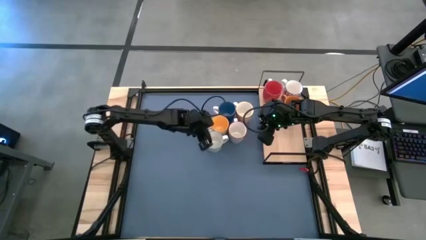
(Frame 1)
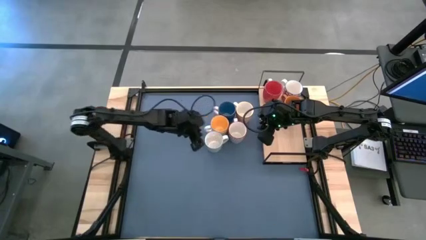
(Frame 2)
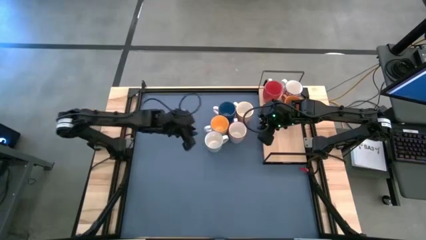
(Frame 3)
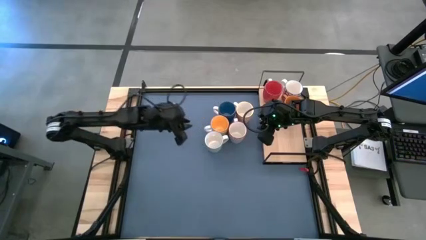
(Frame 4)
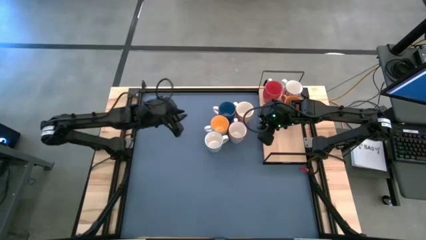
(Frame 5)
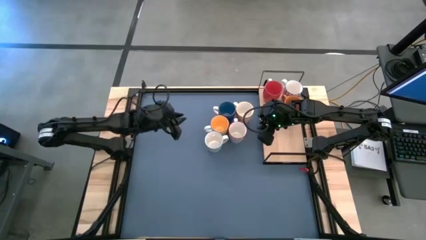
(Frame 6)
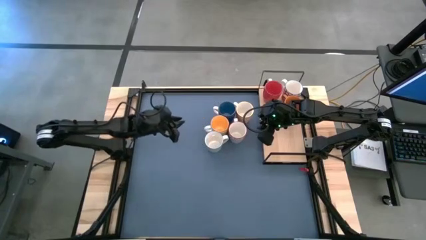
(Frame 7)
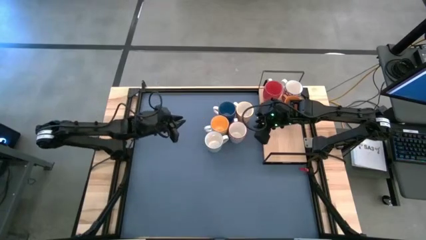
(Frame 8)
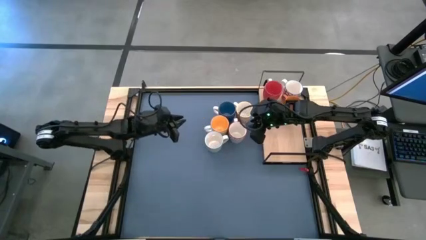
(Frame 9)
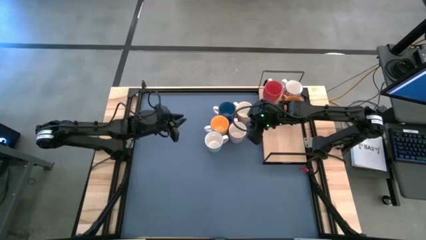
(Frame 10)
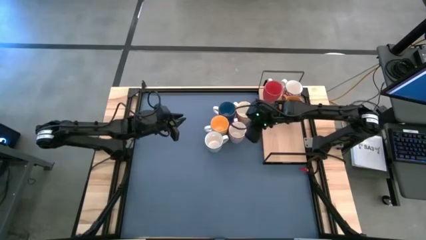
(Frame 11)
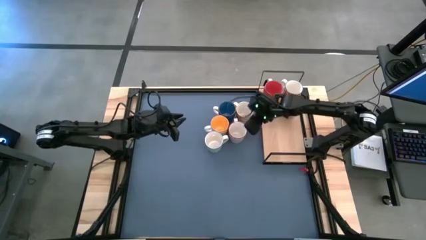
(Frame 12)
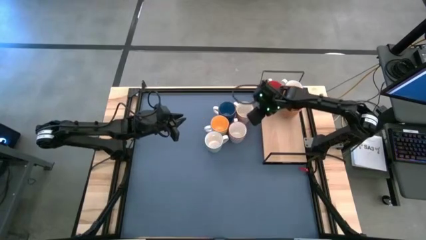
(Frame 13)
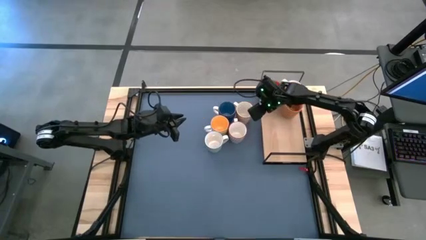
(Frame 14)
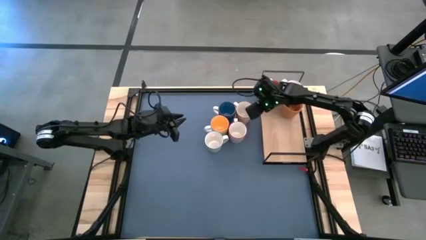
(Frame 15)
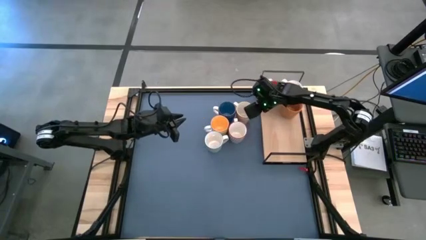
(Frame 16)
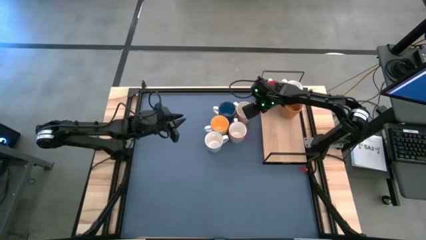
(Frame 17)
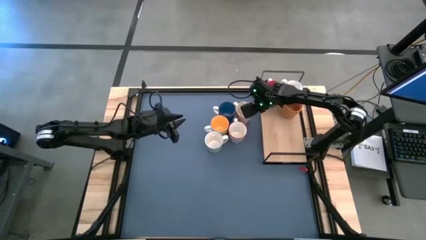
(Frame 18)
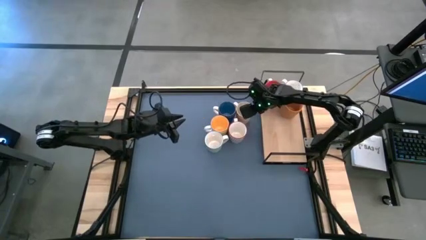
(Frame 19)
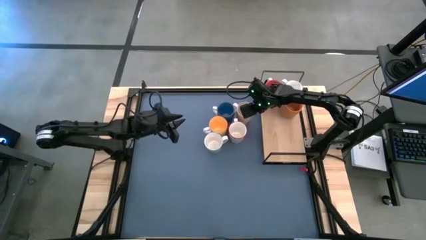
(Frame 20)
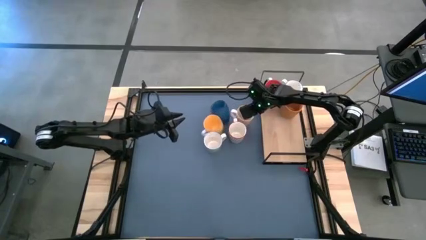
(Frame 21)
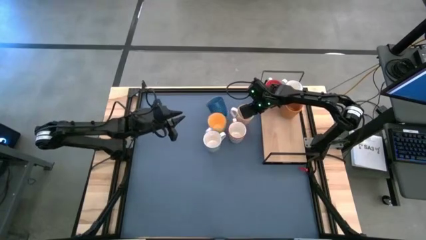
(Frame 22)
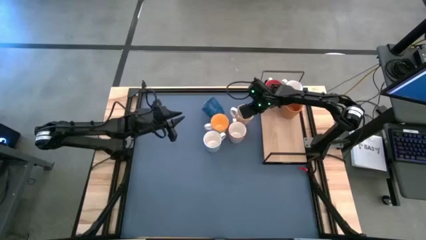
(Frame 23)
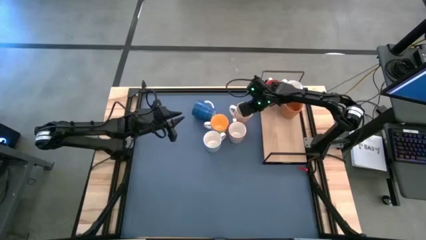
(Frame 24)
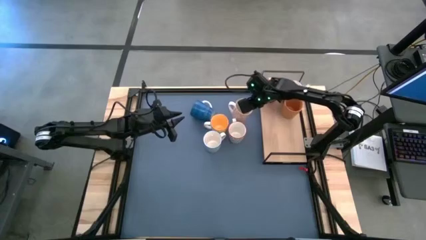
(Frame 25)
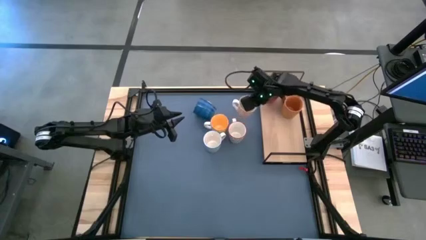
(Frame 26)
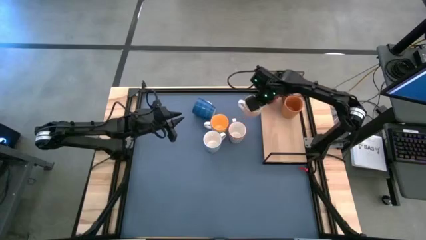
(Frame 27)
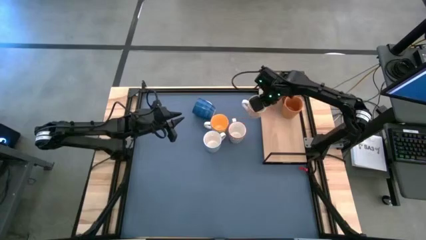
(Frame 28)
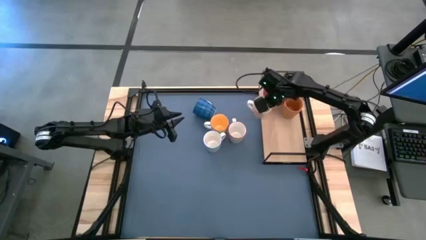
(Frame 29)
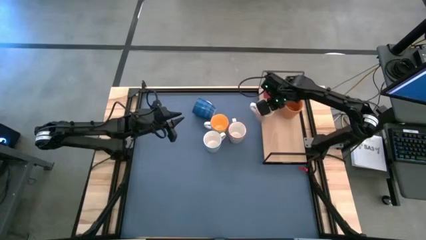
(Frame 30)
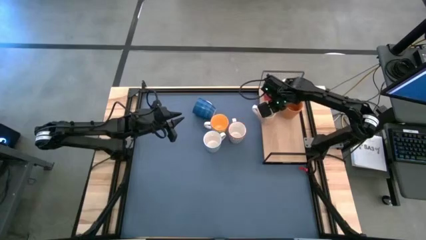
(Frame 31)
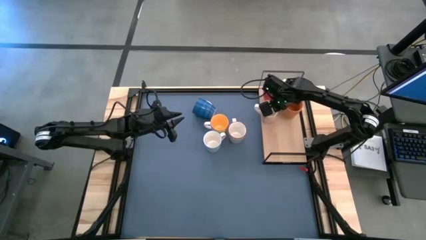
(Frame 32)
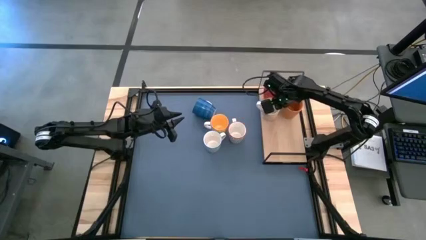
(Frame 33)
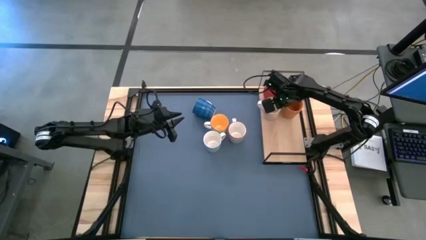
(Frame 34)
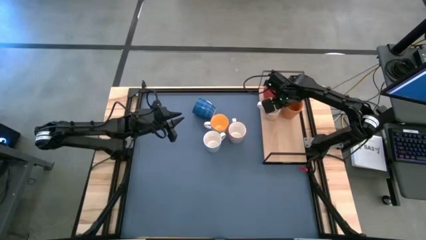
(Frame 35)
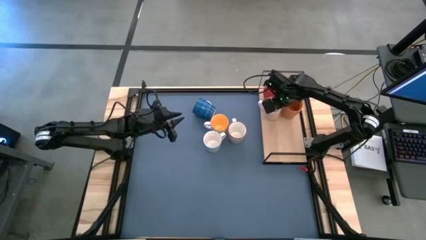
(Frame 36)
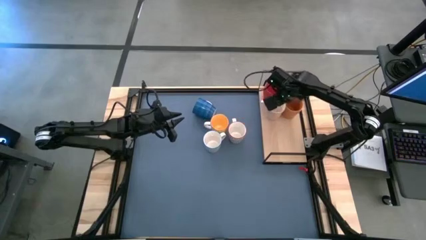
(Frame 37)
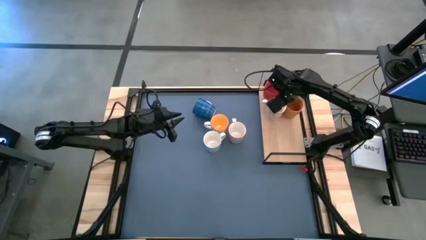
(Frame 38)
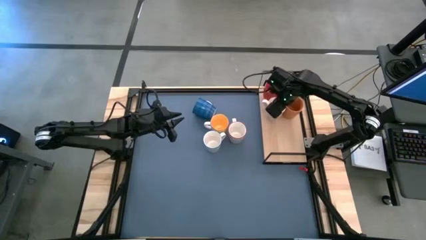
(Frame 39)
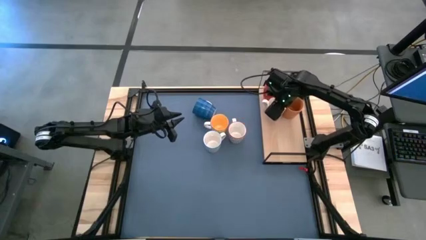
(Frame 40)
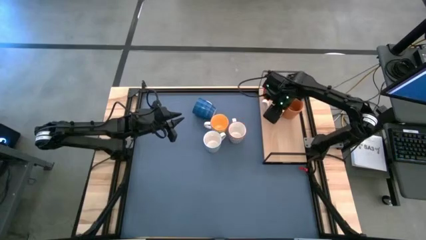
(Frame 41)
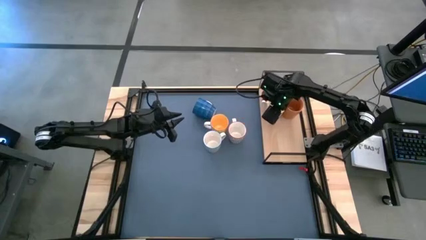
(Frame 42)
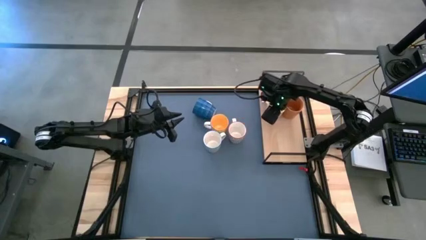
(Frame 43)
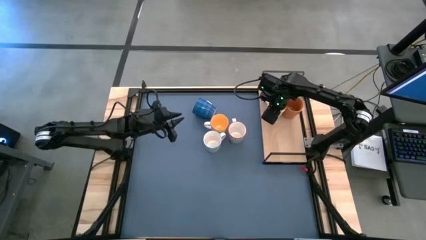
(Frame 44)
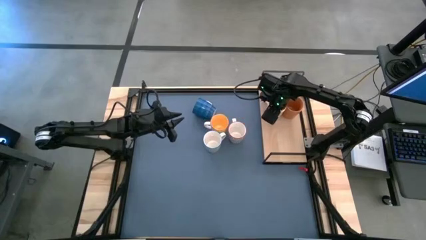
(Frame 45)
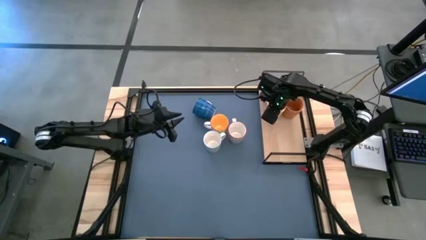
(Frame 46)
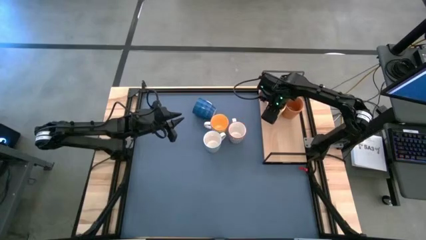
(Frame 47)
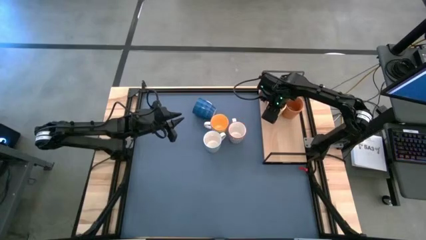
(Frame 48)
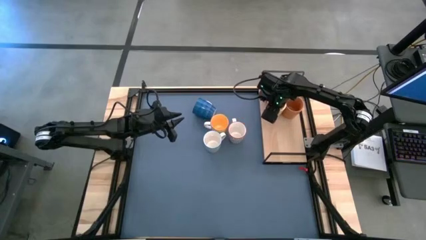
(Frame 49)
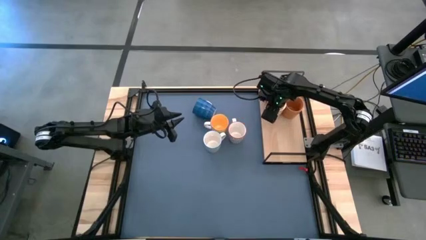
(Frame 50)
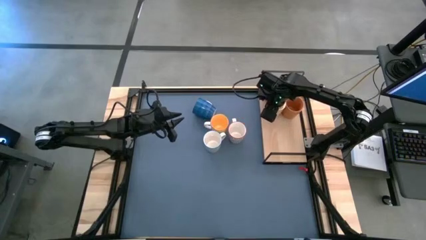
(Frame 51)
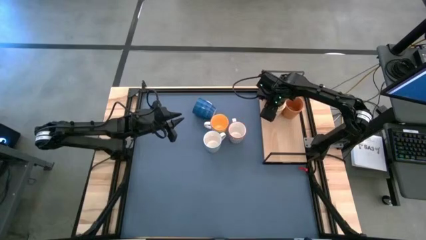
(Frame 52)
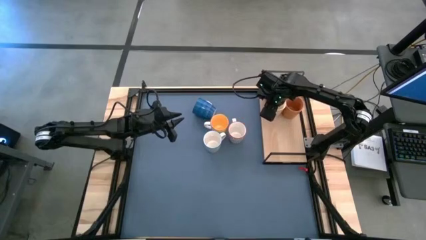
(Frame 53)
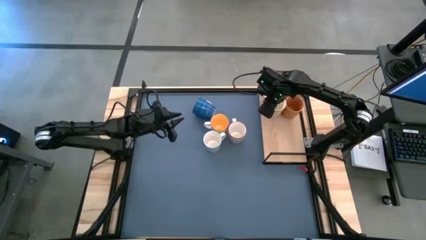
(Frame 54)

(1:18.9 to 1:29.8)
Task: Place coffee mugs
Put the orange patterned mug on the shelf

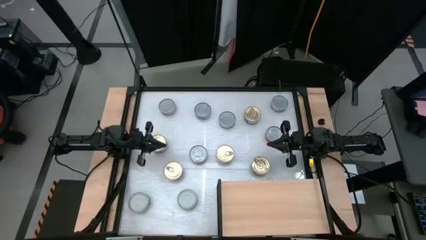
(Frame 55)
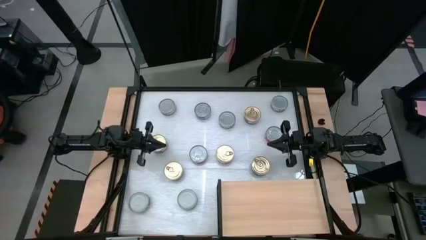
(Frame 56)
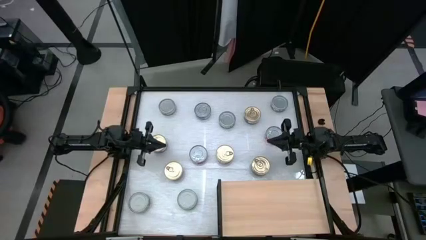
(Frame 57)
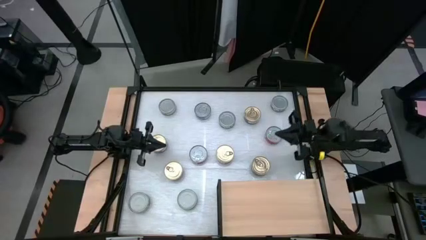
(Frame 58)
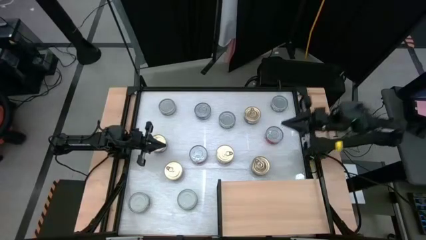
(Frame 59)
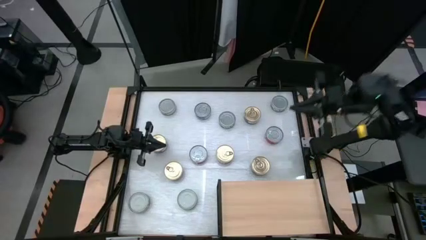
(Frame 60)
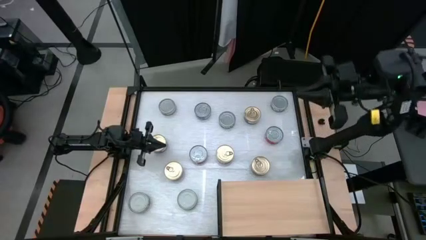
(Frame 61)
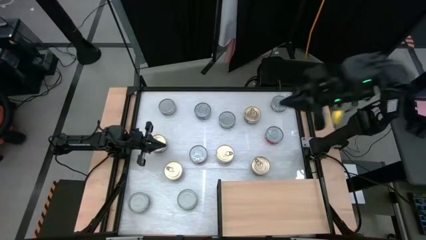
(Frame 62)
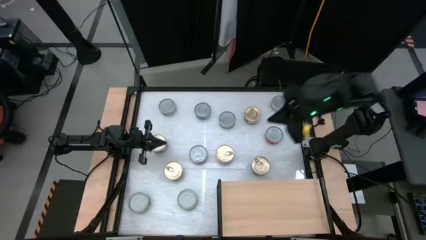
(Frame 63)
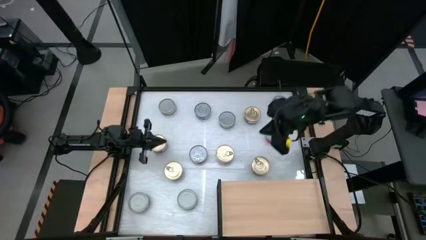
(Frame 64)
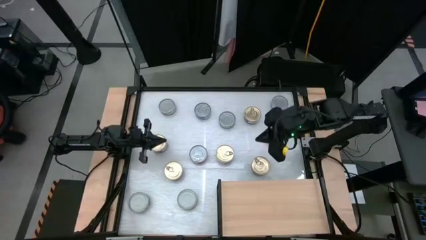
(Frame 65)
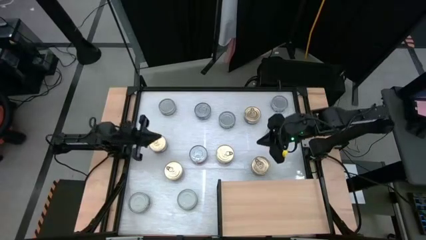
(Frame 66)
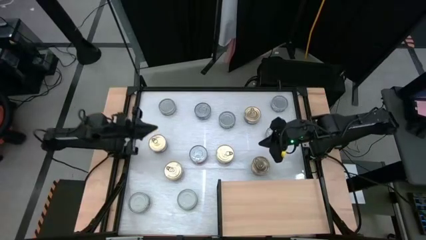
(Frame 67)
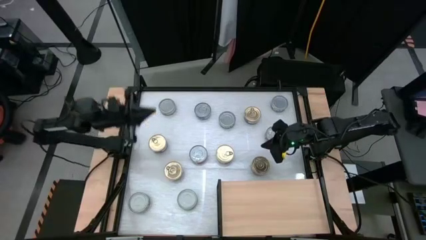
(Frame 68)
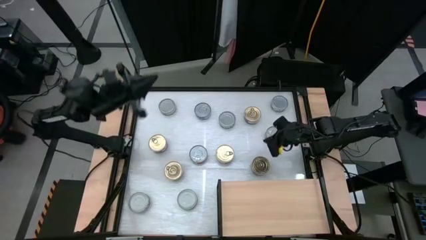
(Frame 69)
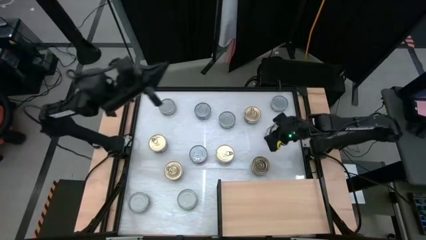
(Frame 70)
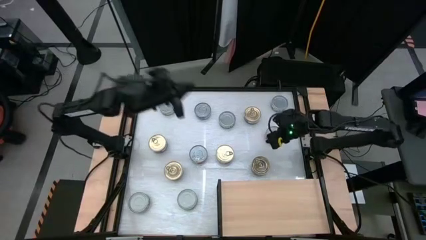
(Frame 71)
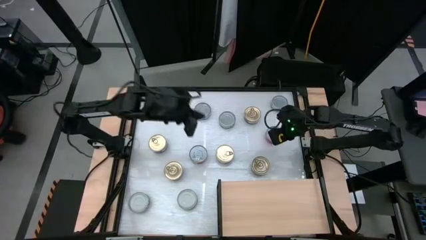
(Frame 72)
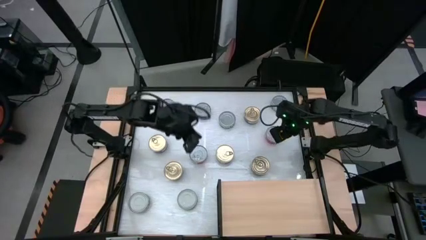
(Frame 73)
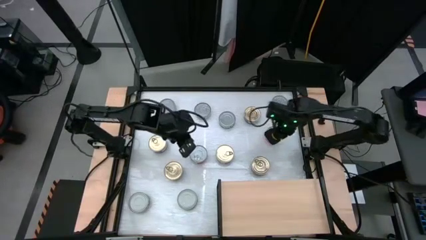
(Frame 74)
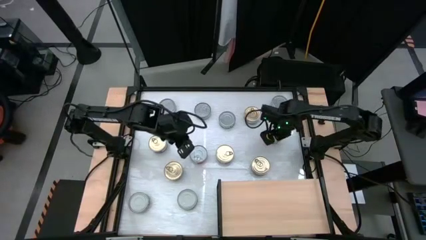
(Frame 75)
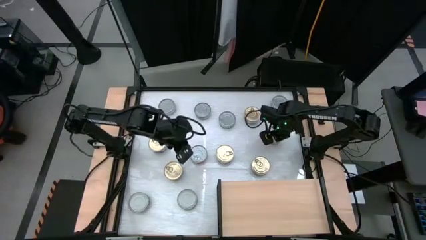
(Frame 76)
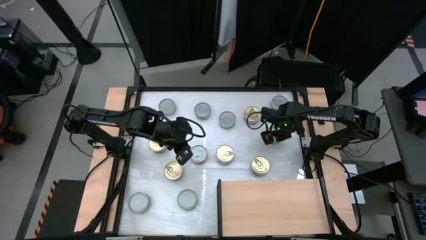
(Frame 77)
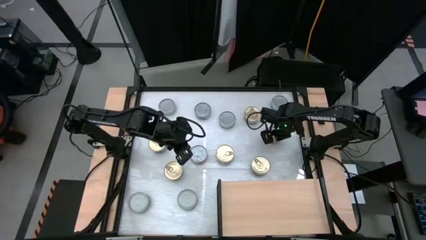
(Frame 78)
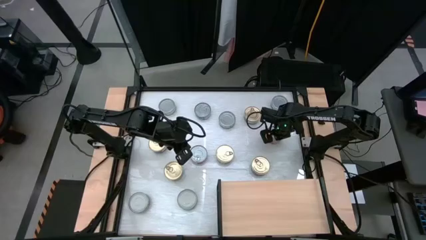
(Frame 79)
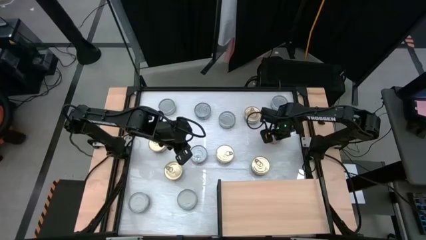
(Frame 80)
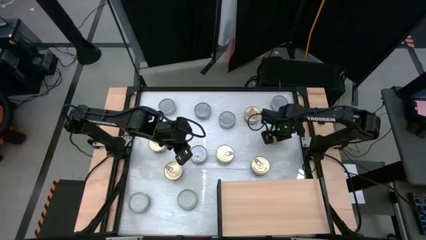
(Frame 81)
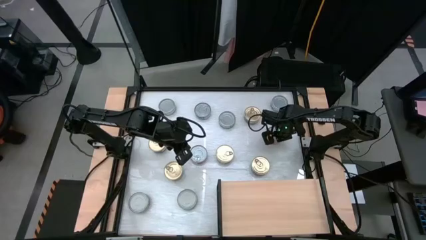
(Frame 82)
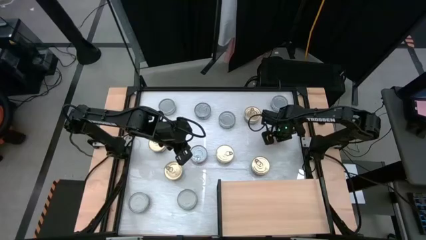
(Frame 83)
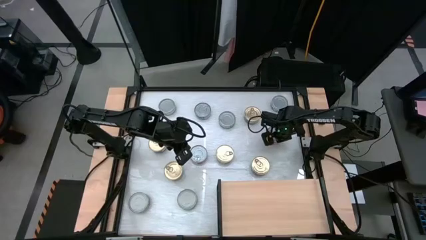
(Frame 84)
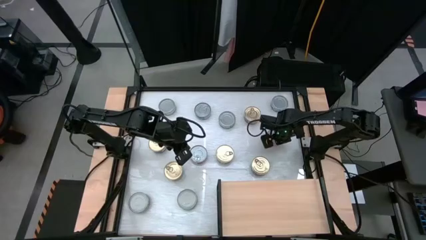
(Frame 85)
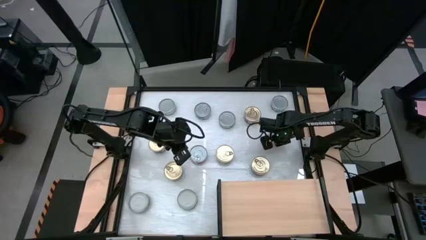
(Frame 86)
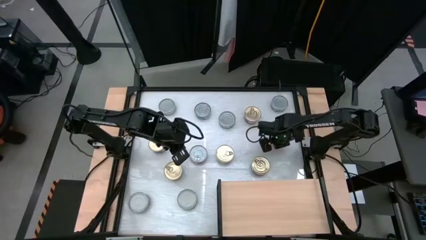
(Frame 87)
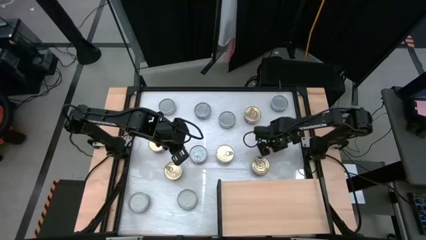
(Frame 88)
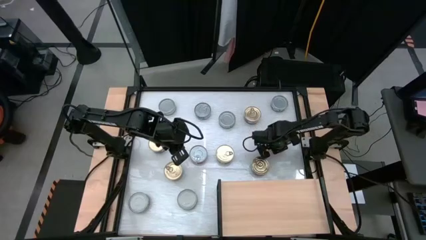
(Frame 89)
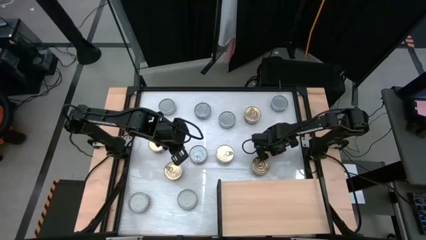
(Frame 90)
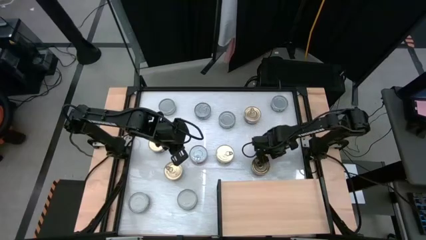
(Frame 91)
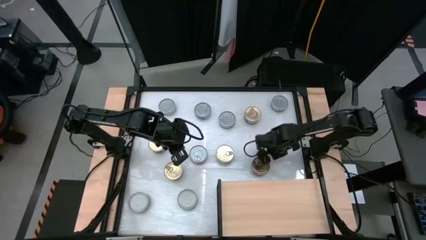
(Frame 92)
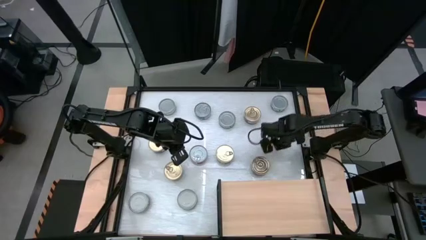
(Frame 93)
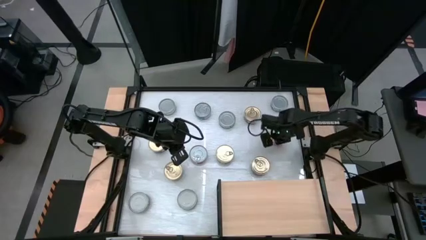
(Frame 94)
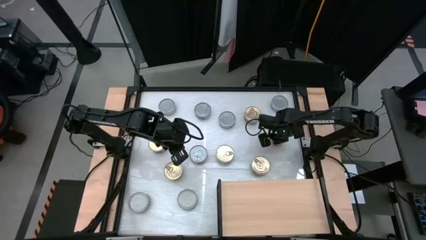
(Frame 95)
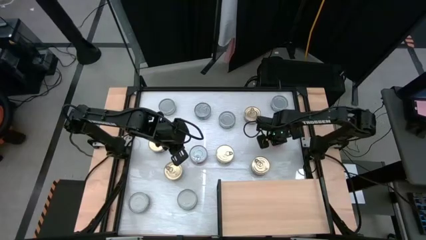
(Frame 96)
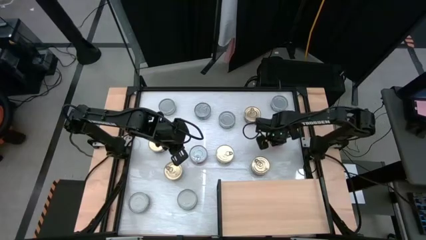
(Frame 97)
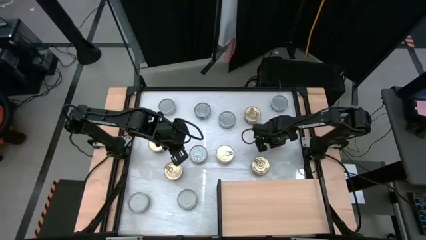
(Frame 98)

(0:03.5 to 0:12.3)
Task: Stack canned seafood by type on shelf
Put the red tuna can on the shelf
